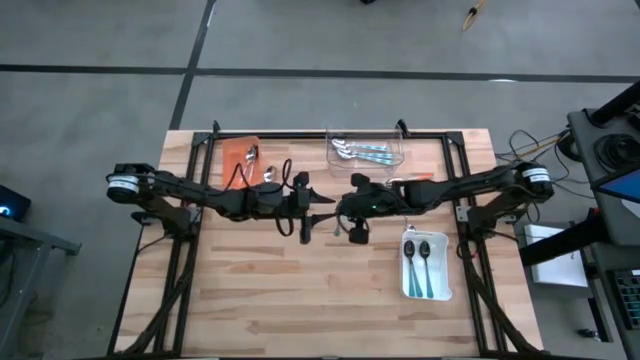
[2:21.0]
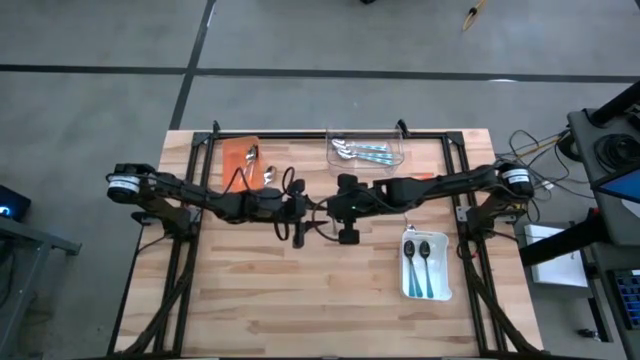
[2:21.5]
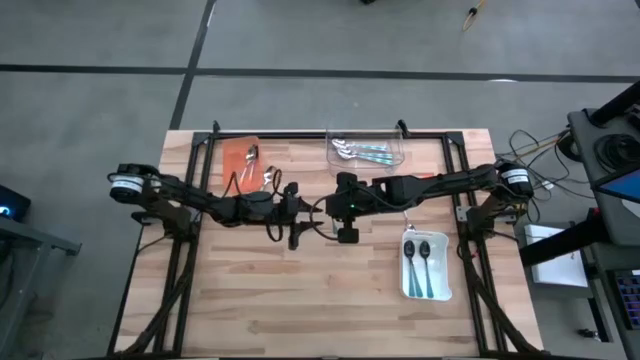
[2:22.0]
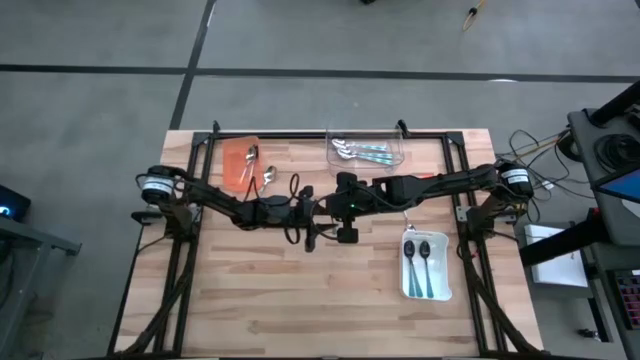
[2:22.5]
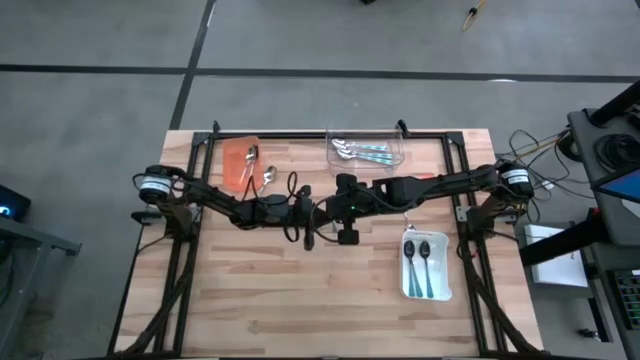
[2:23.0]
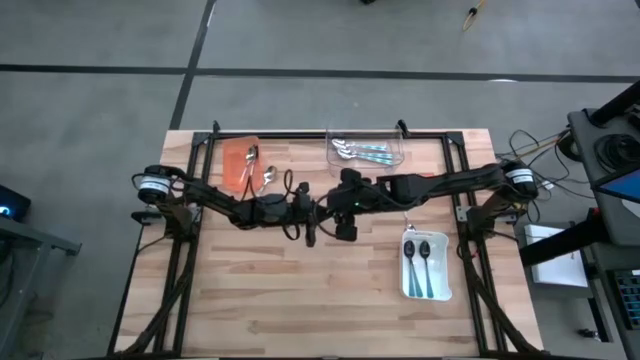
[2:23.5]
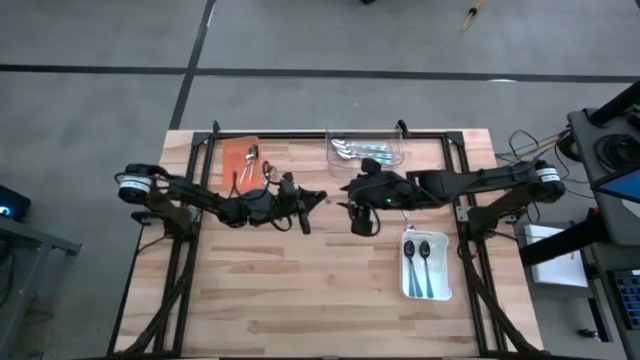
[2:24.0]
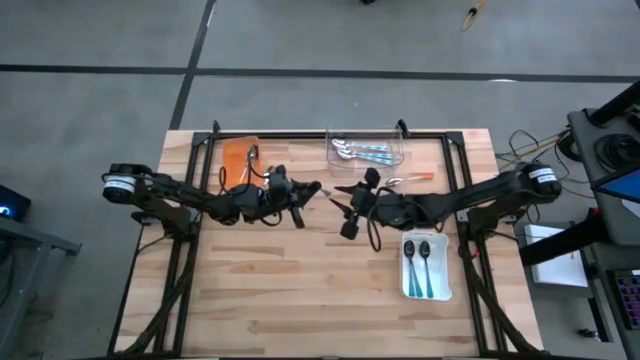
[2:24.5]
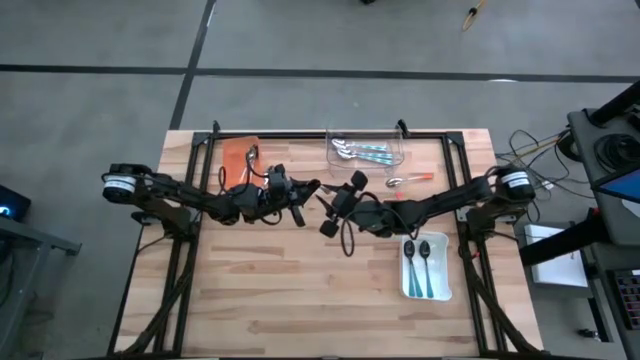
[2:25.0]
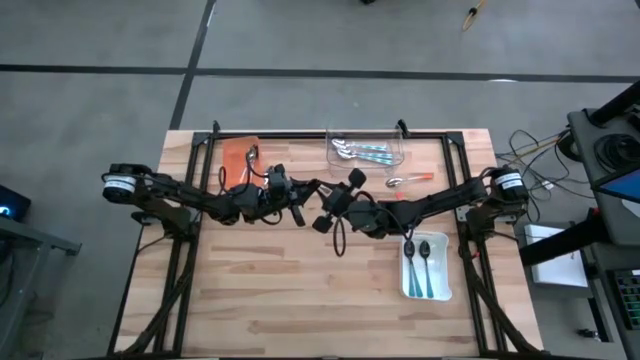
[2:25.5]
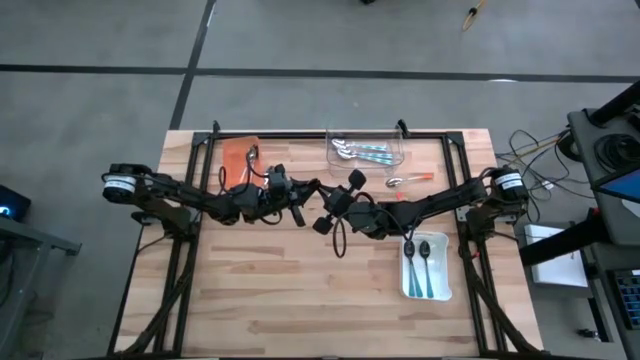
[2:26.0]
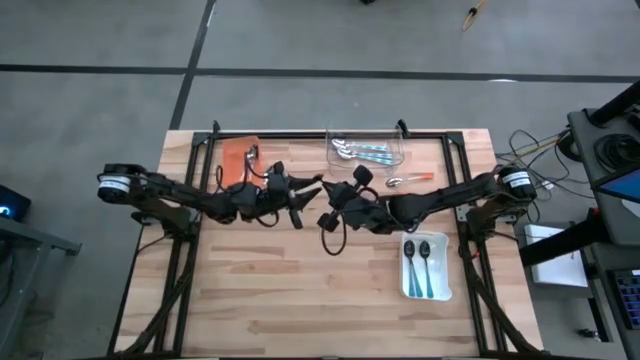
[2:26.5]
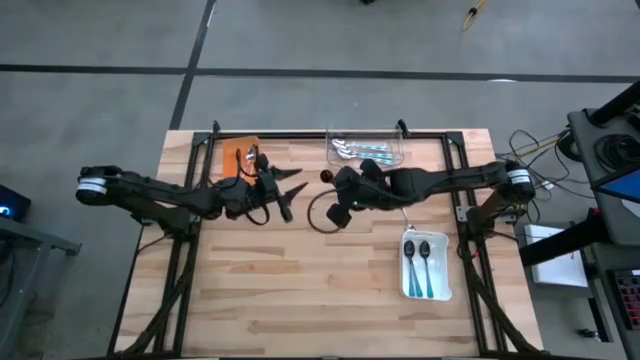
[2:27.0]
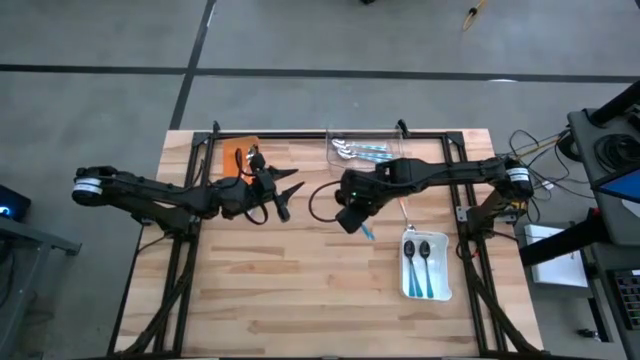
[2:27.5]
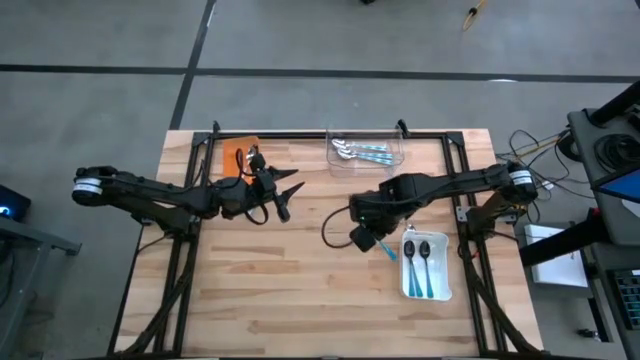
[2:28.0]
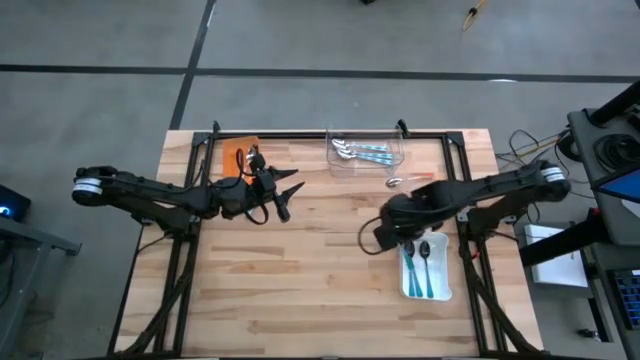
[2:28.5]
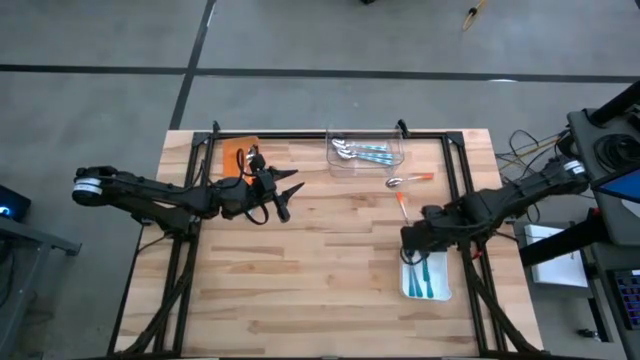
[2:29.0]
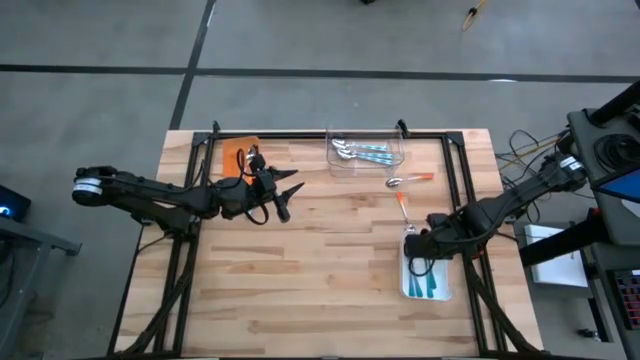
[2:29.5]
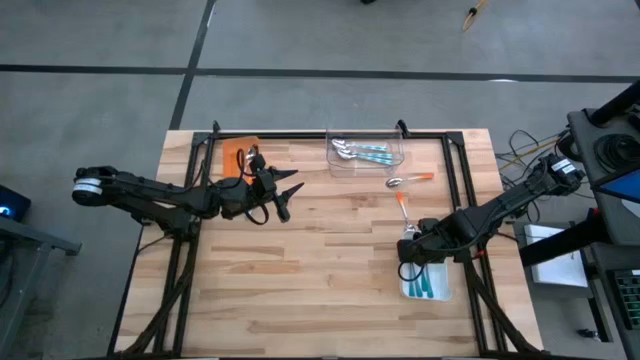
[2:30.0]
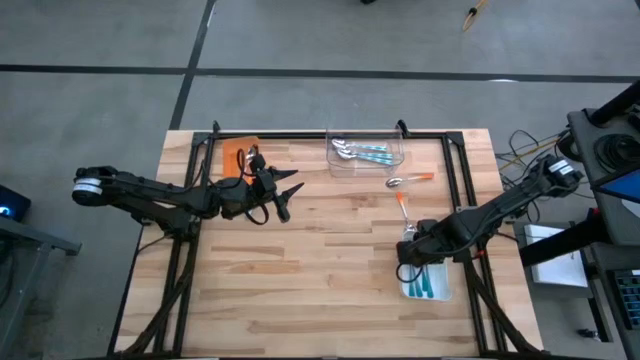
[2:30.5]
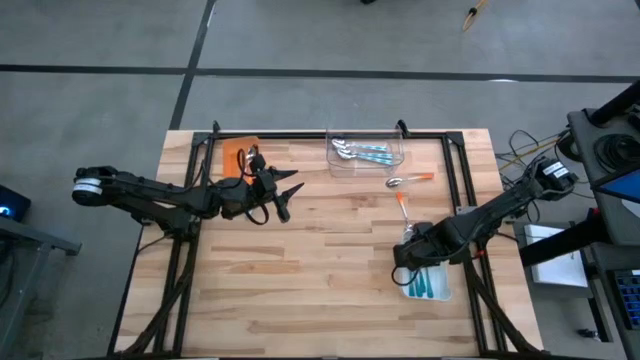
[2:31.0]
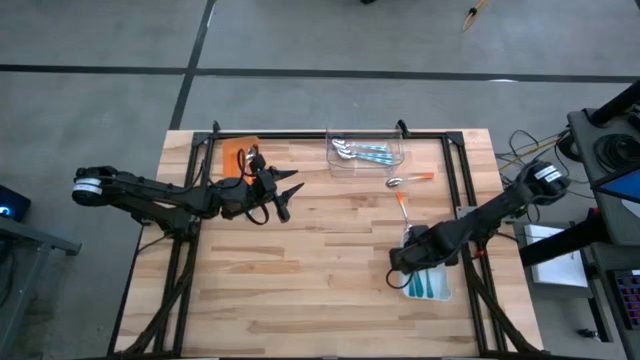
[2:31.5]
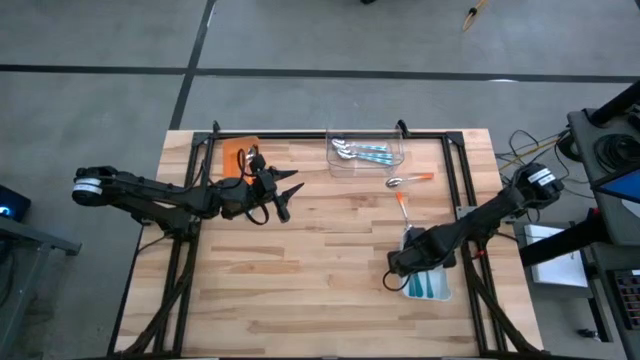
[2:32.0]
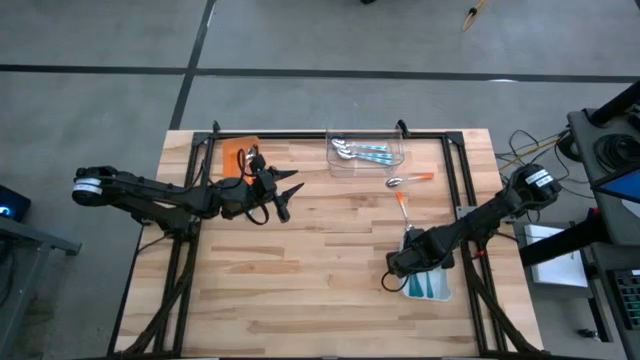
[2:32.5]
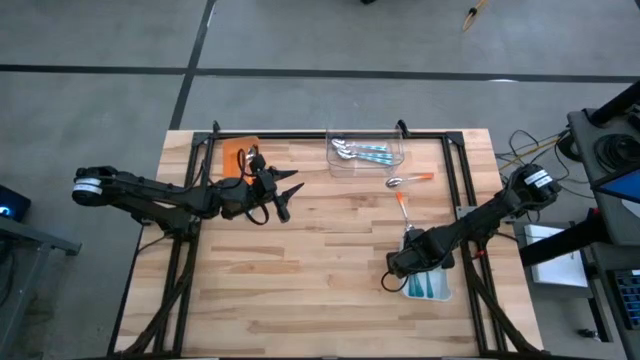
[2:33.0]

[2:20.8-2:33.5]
Task: Sort silverware by color (type)
Put the blue spoon into the white bin

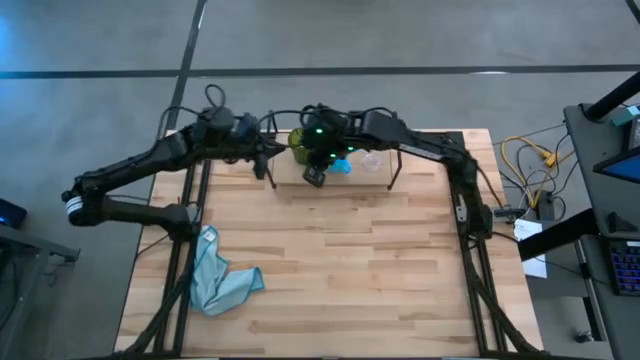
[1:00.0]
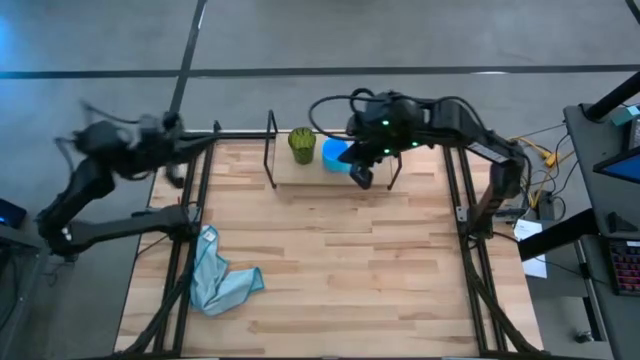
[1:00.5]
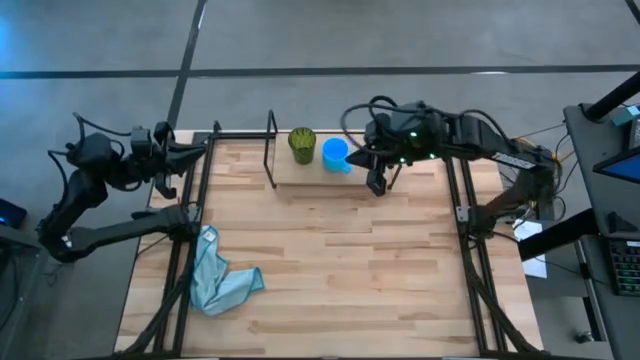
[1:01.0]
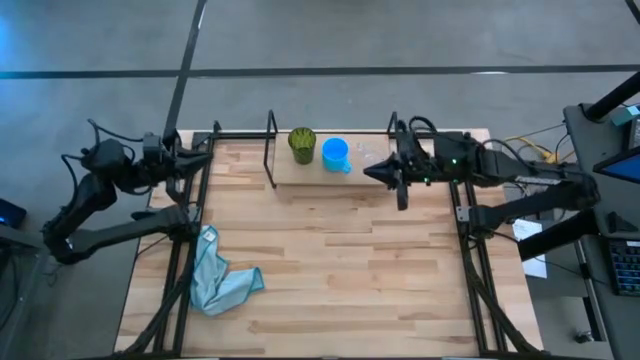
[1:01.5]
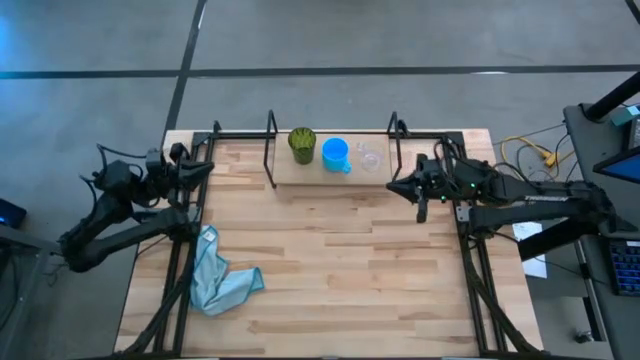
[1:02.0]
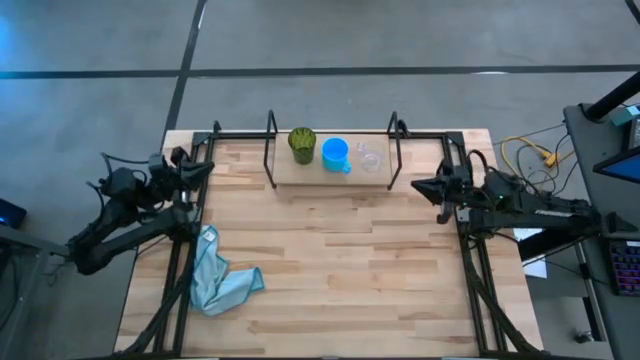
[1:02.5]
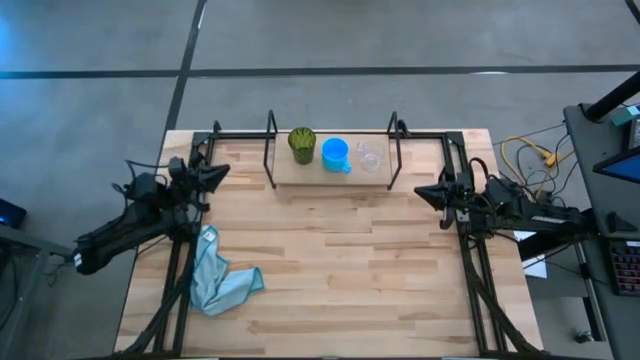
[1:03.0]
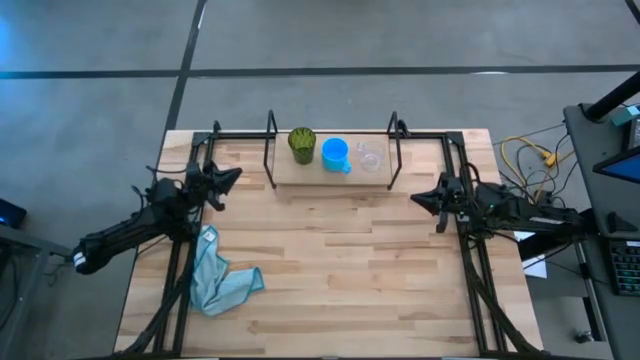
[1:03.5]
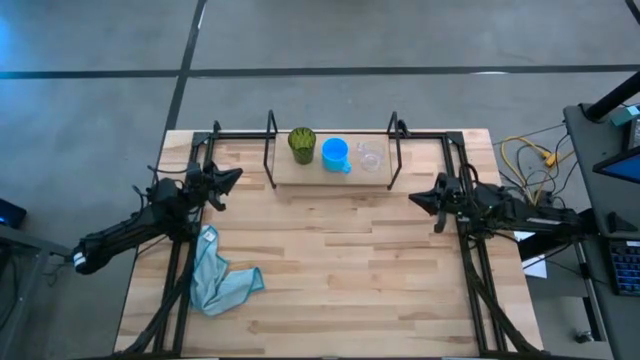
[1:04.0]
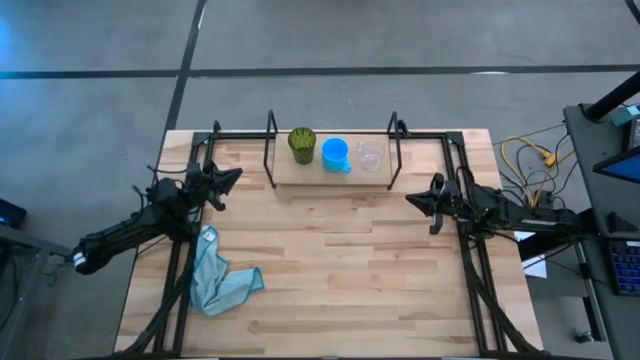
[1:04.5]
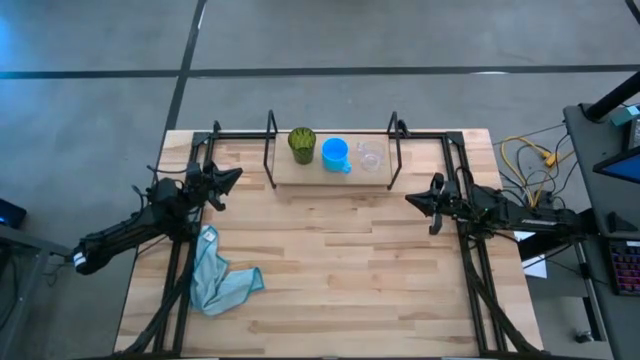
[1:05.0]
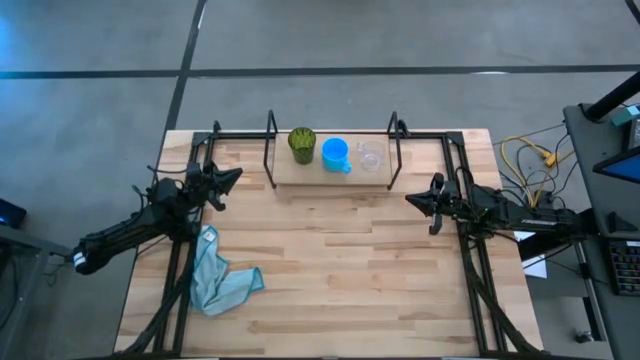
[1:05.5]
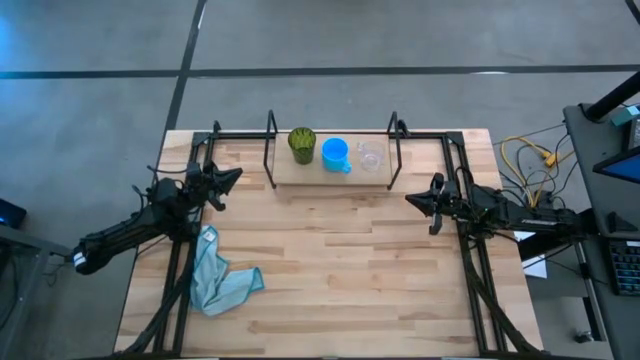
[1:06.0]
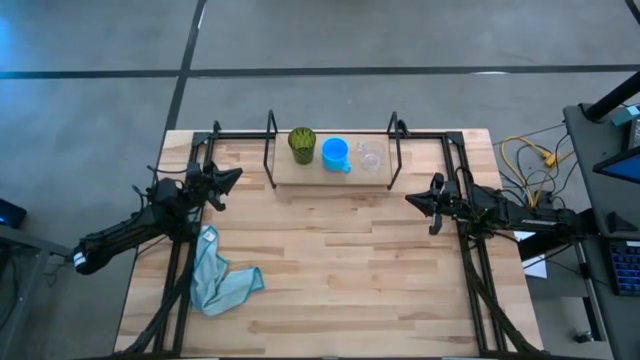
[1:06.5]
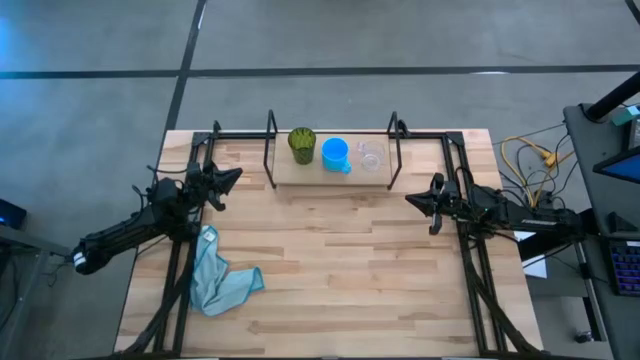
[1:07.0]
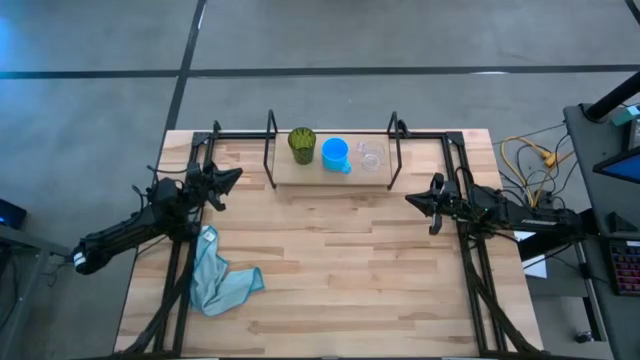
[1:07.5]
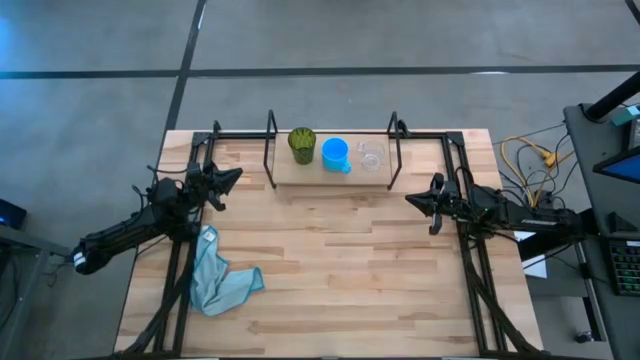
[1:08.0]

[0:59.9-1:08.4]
Task: Stack small to large cups/mugs on shelf
Return to Home Position
